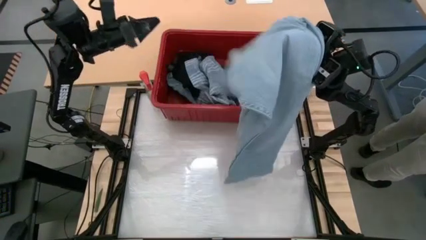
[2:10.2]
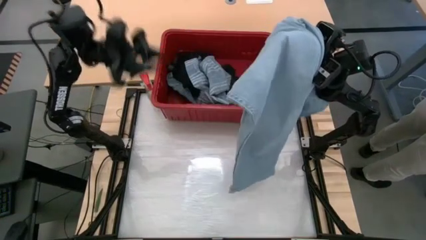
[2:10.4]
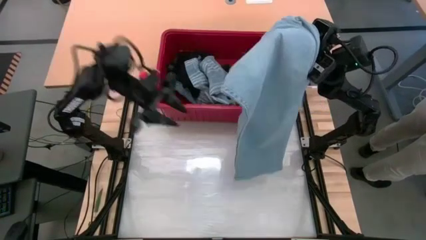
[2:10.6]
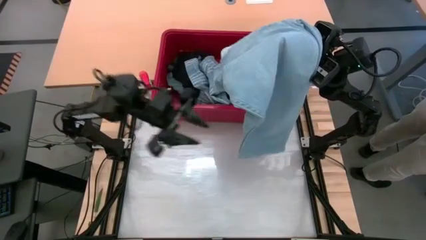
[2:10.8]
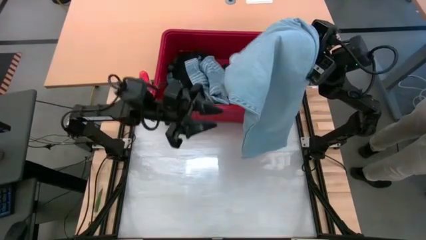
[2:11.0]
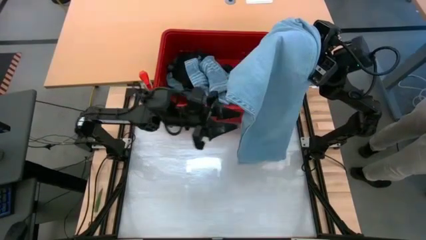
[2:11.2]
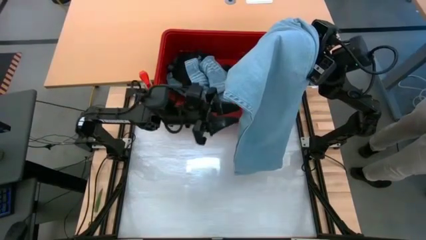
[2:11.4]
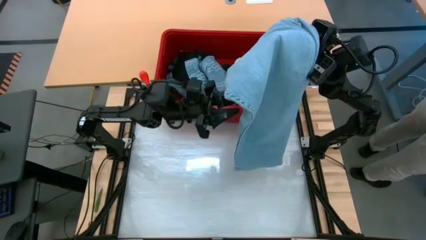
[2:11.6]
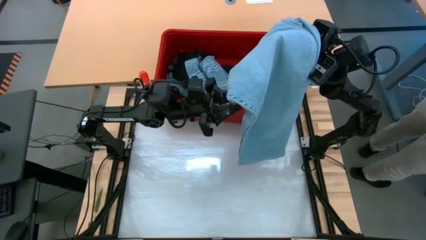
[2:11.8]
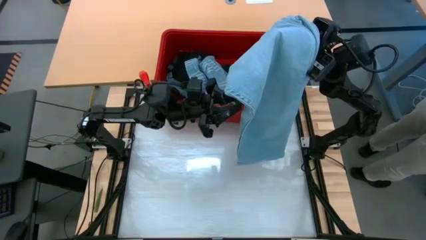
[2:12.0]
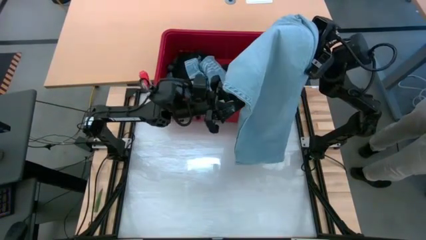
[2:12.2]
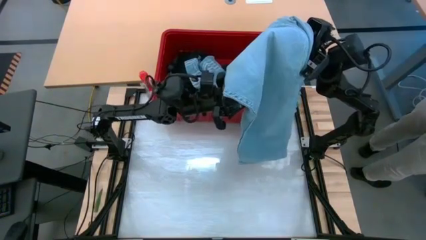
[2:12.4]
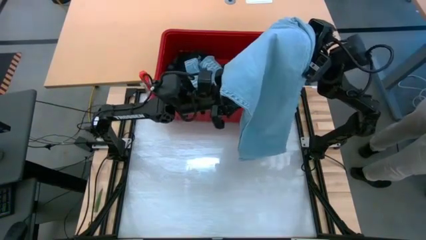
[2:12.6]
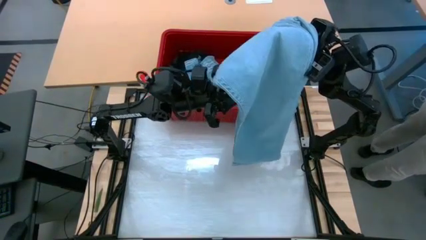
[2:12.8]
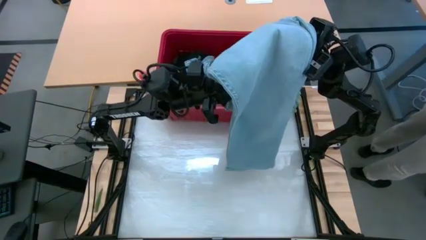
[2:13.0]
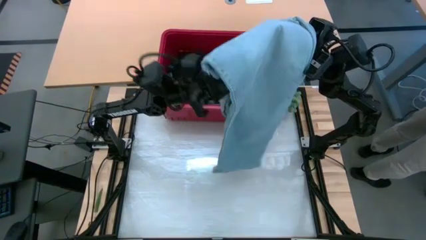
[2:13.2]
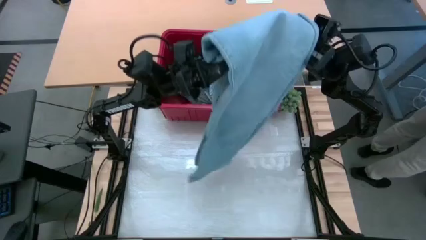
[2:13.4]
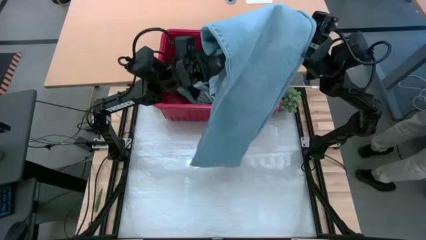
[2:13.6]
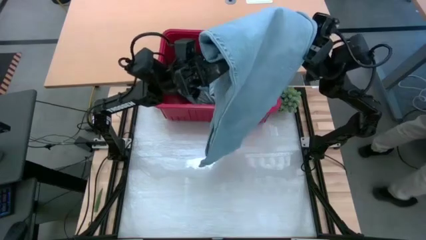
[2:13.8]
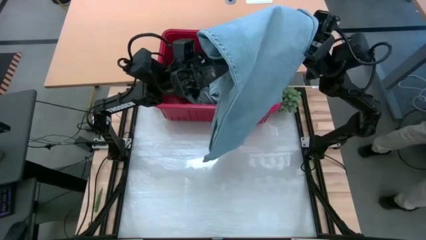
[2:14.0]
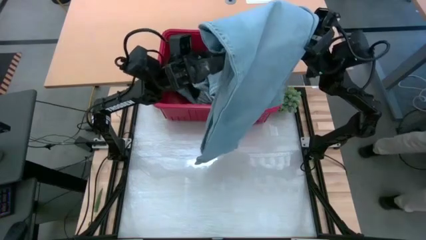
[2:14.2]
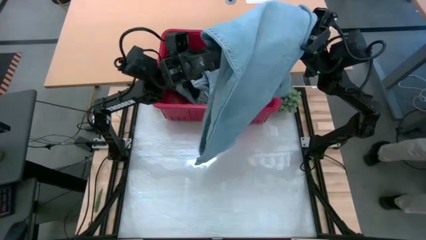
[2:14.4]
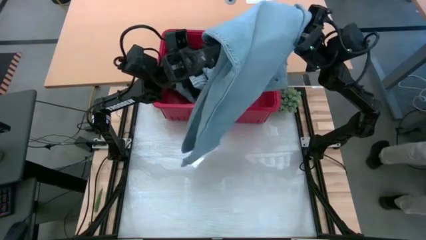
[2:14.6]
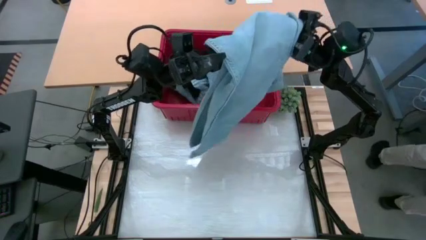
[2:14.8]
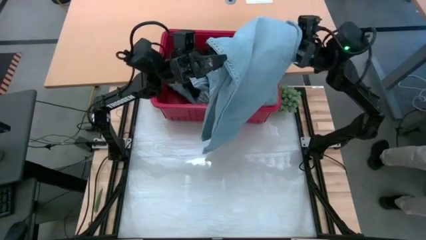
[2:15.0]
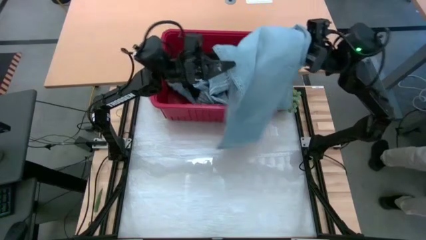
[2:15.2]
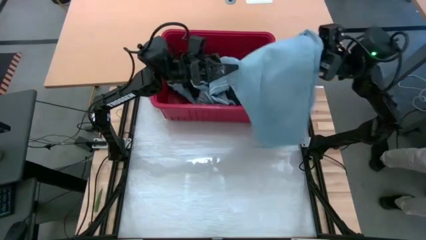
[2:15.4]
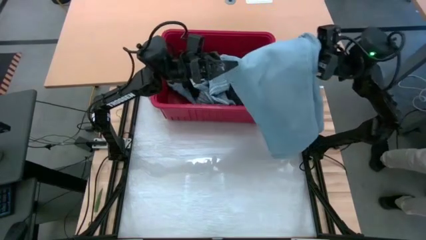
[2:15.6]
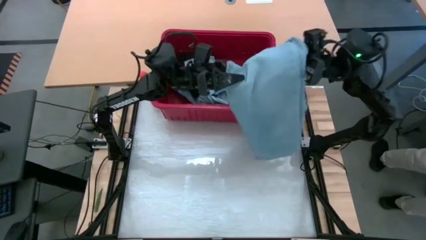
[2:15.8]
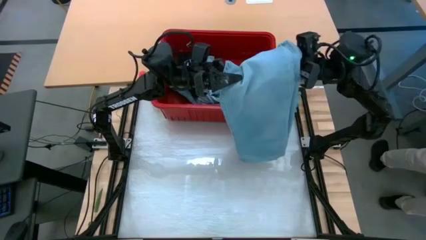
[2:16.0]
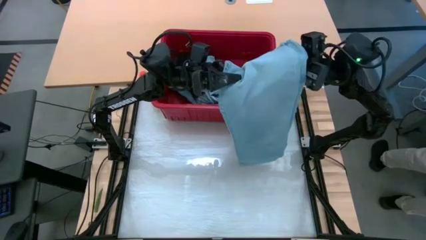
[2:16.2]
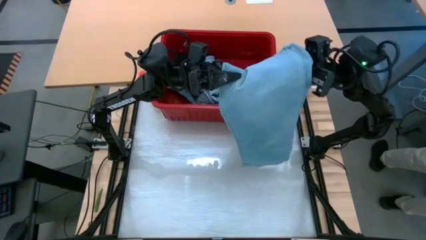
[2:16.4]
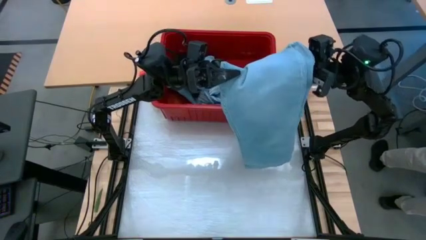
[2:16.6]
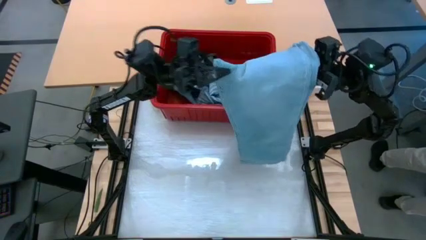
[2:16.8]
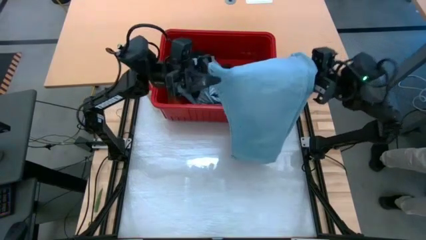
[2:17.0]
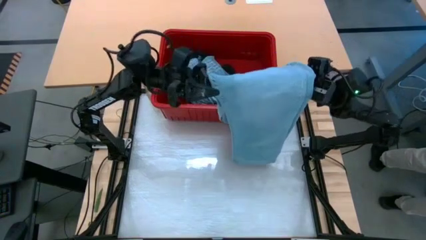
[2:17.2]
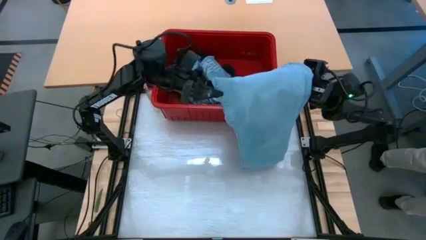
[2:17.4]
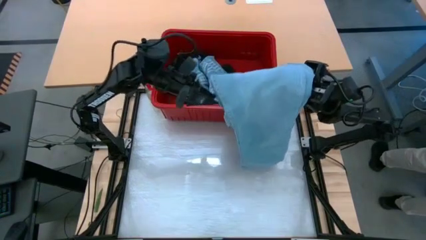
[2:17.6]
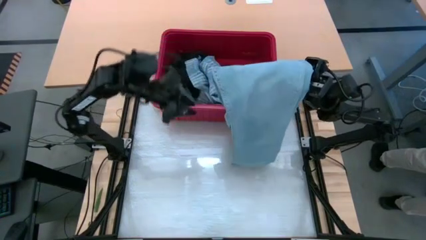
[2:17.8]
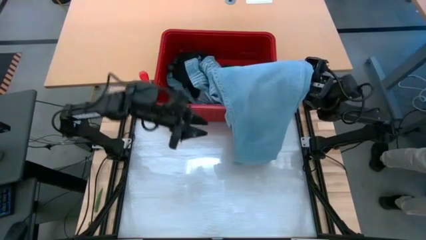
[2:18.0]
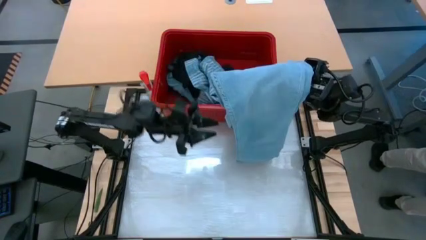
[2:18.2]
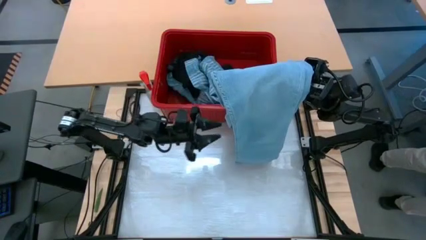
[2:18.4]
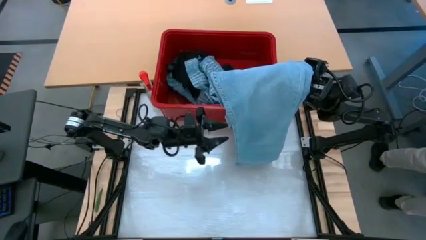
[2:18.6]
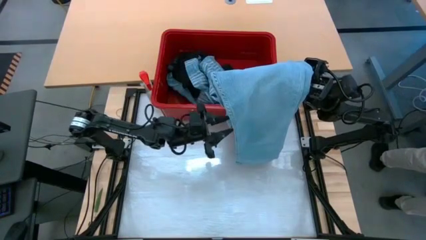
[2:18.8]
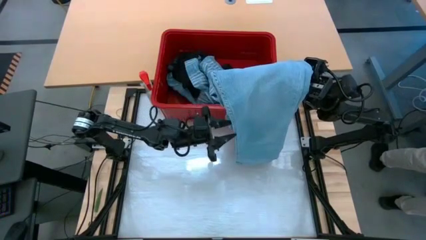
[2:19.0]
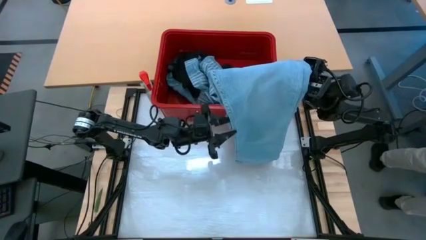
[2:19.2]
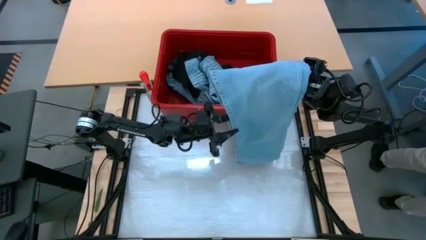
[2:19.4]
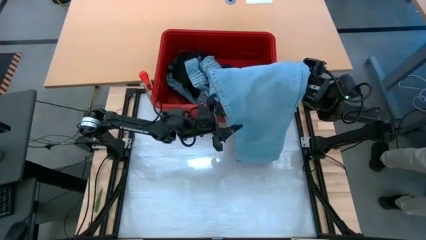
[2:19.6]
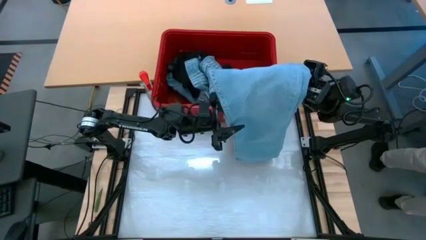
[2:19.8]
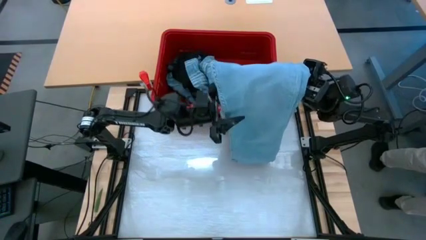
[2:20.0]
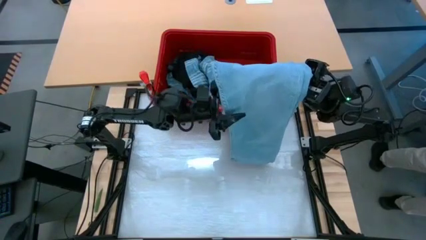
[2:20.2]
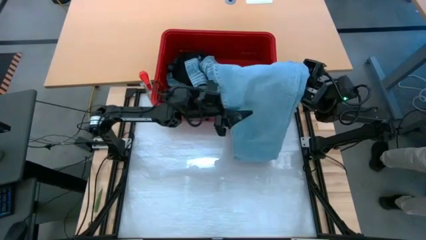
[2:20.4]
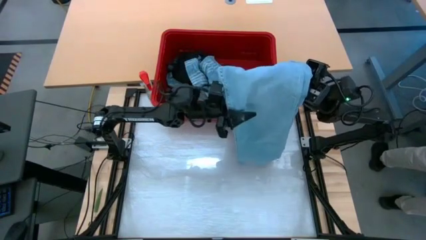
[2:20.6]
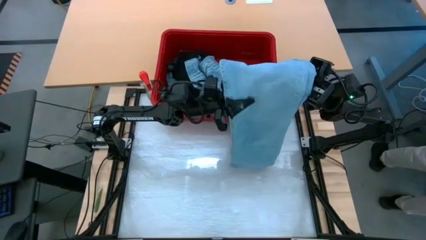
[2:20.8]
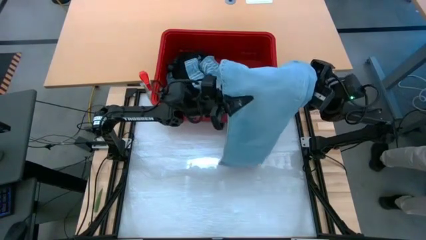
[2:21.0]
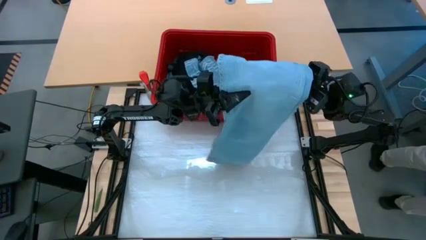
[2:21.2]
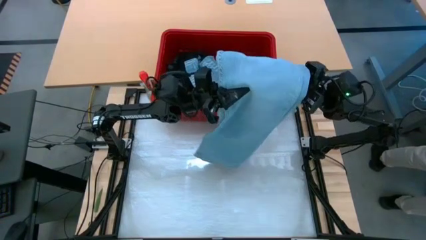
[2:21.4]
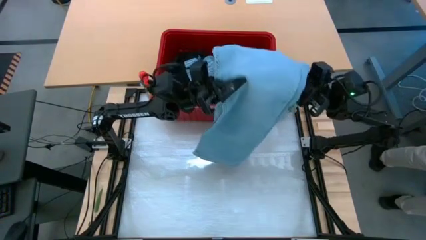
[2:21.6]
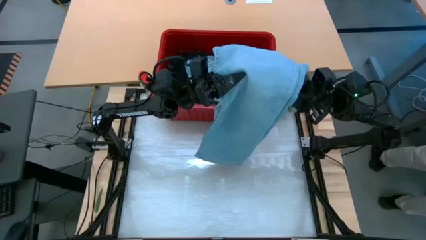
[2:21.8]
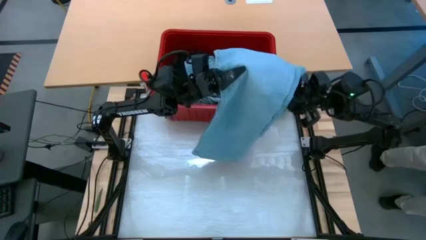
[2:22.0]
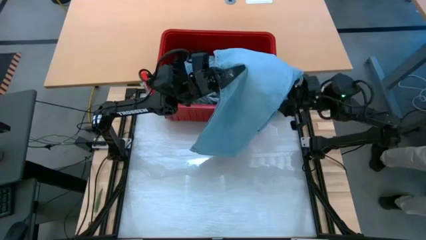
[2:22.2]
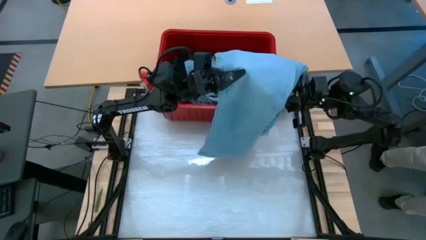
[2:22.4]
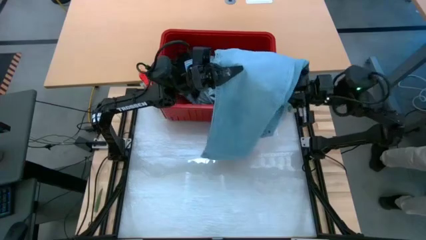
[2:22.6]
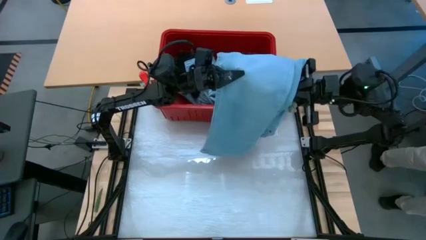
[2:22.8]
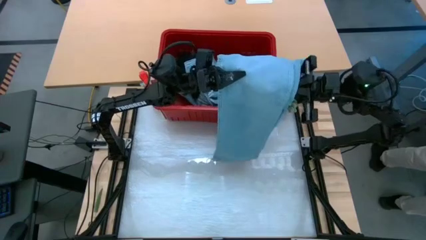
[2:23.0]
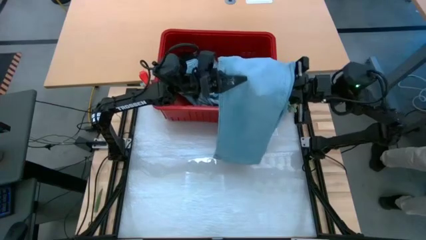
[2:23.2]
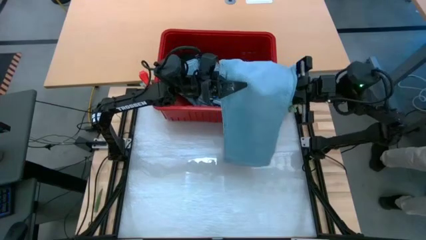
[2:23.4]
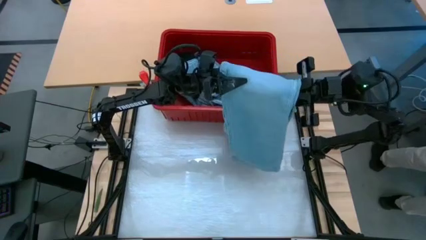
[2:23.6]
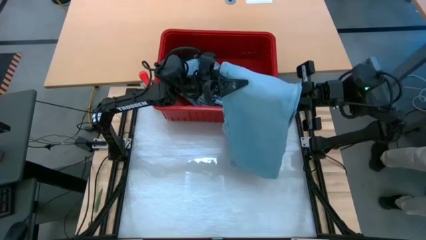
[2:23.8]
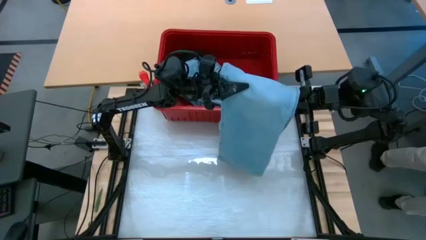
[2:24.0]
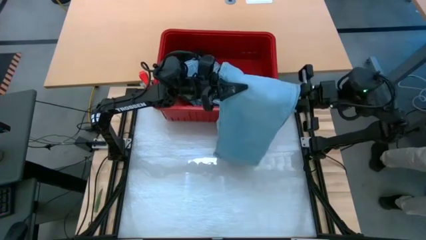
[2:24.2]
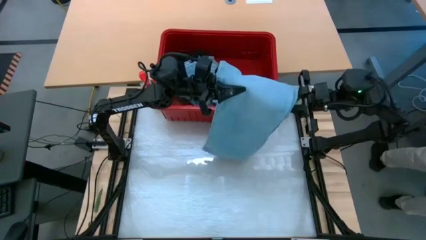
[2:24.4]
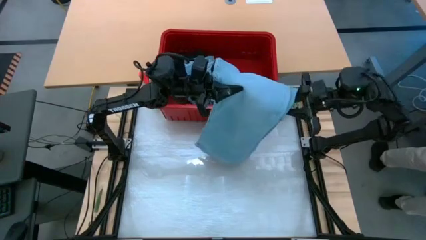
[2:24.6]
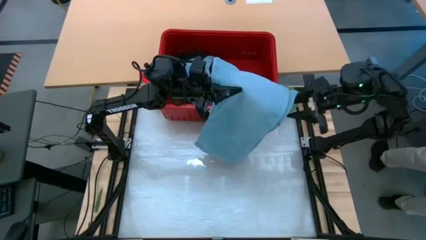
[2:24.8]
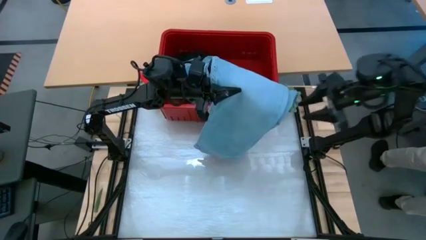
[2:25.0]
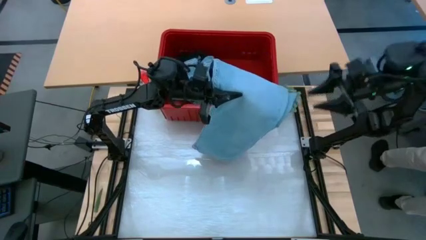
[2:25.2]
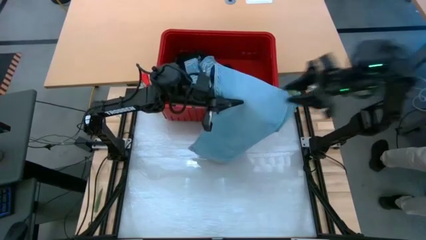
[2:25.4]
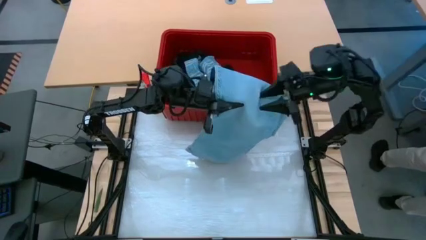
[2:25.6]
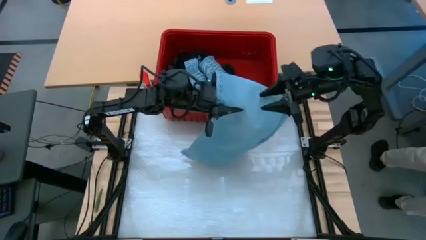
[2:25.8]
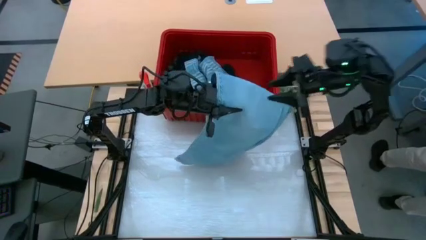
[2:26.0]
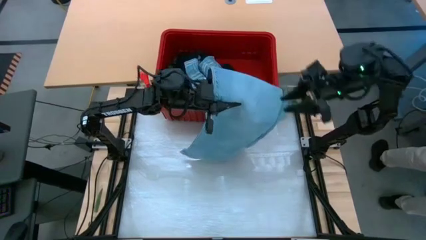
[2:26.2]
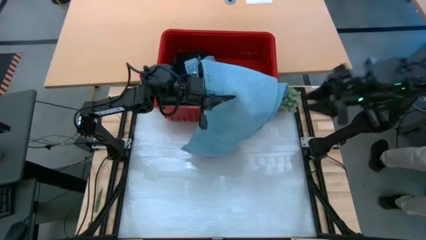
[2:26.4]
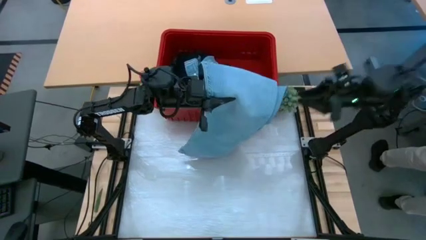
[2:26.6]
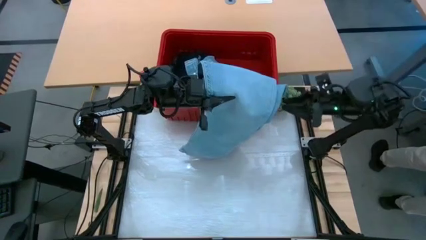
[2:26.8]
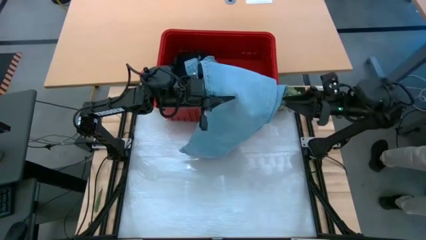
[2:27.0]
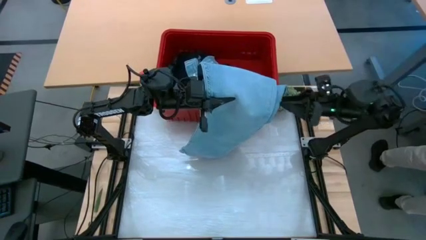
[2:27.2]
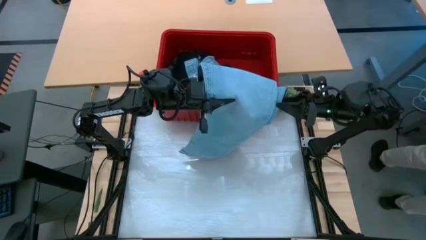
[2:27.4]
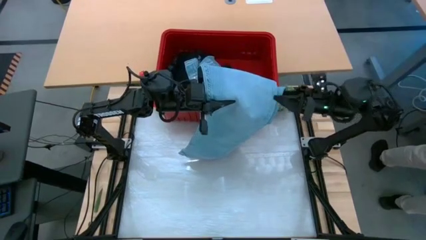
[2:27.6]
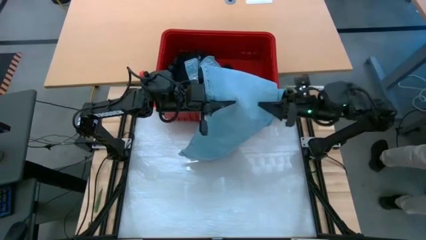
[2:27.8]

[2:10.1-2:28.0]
Task: Fold Laundry from Bin
Fold the light blue pants
